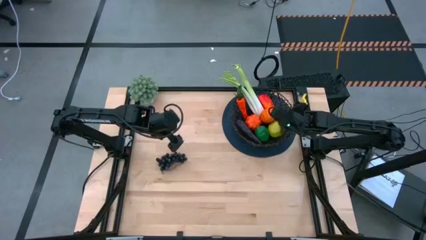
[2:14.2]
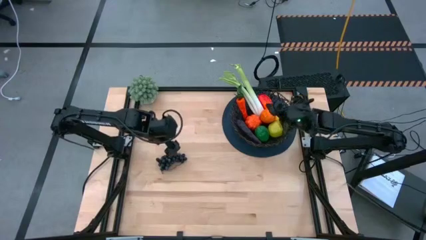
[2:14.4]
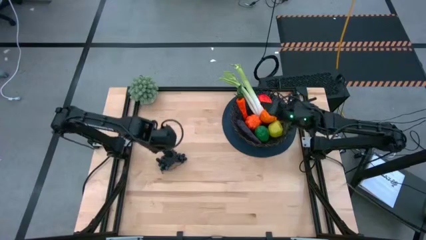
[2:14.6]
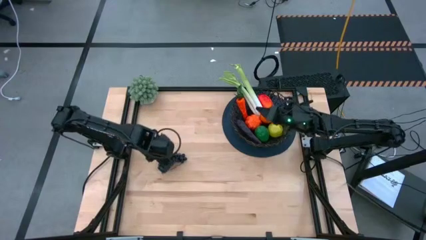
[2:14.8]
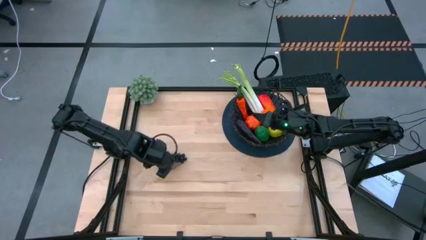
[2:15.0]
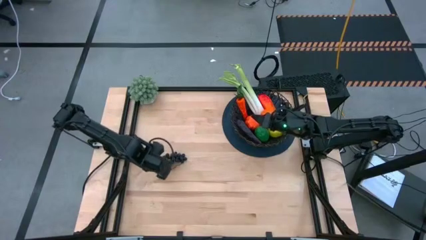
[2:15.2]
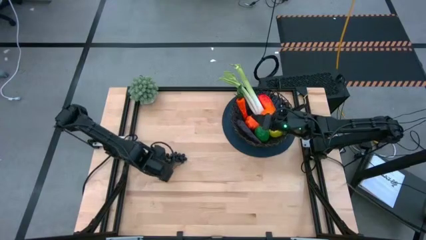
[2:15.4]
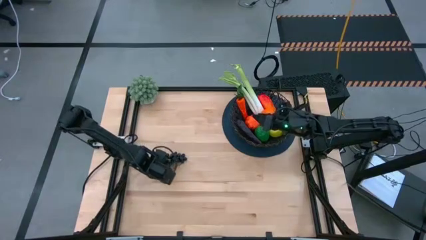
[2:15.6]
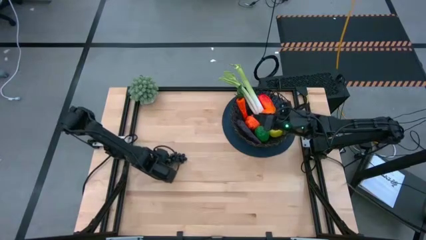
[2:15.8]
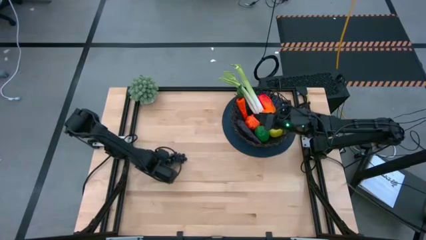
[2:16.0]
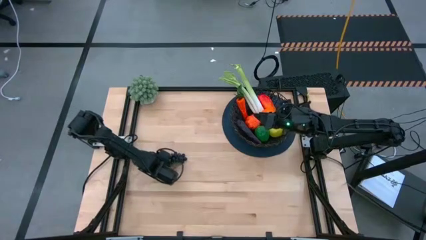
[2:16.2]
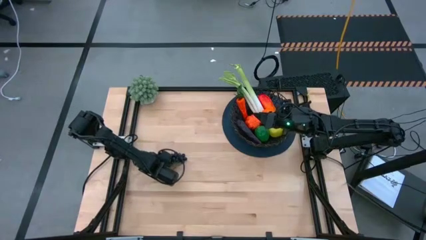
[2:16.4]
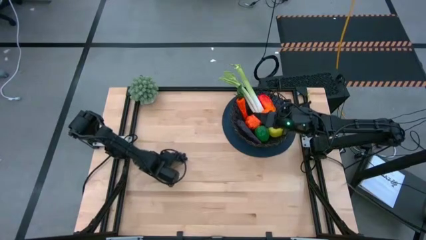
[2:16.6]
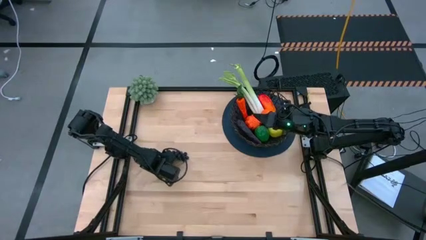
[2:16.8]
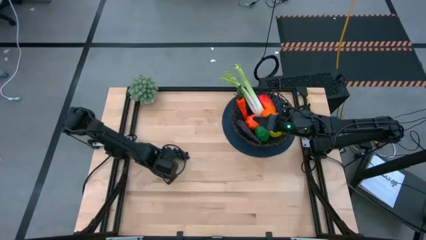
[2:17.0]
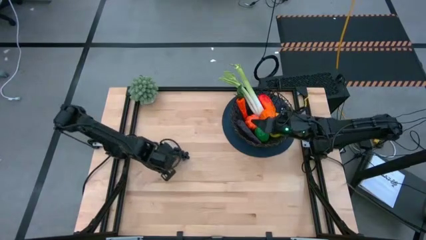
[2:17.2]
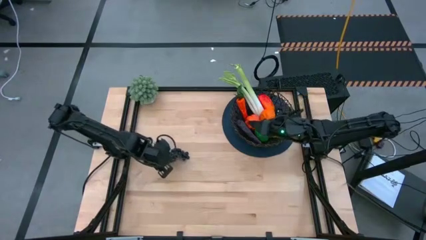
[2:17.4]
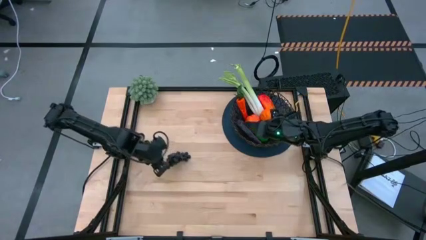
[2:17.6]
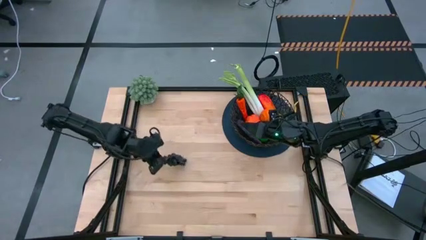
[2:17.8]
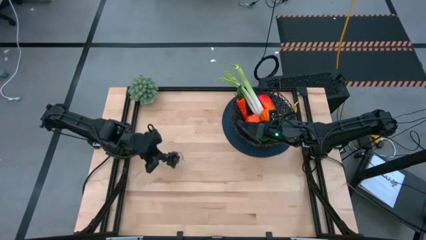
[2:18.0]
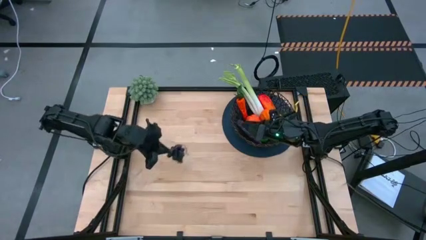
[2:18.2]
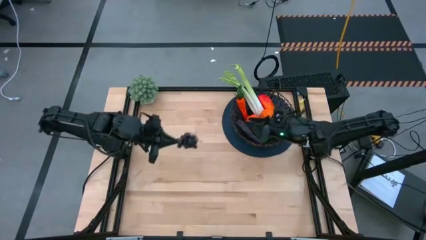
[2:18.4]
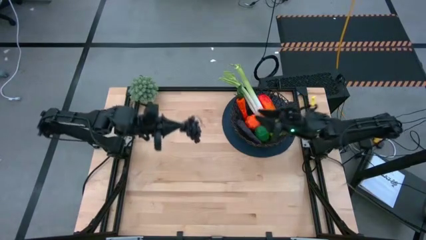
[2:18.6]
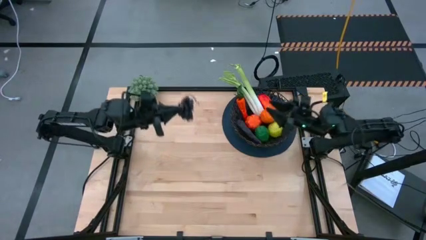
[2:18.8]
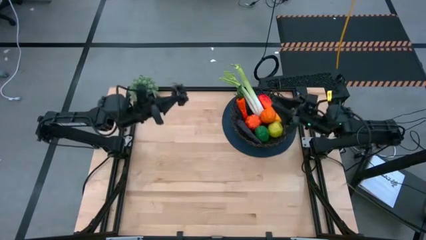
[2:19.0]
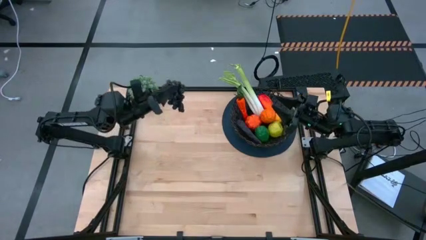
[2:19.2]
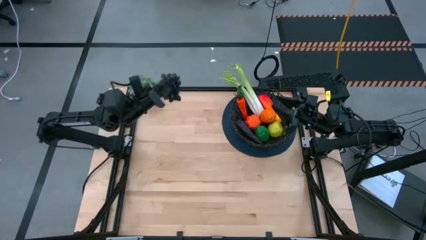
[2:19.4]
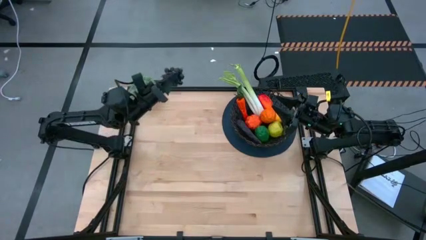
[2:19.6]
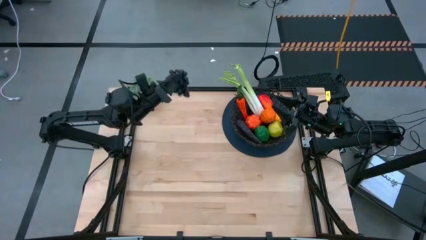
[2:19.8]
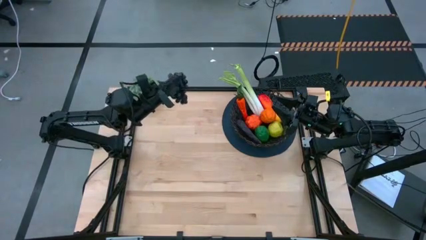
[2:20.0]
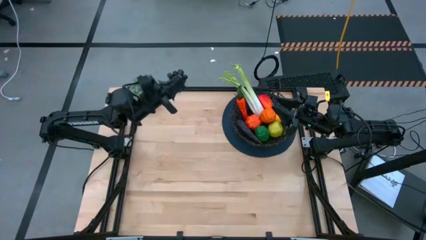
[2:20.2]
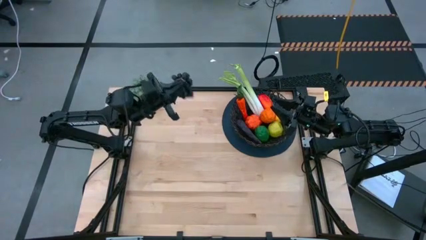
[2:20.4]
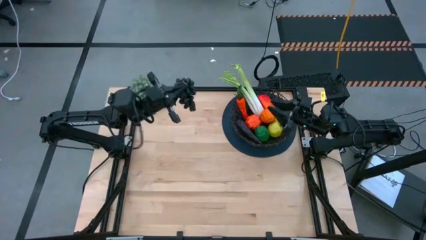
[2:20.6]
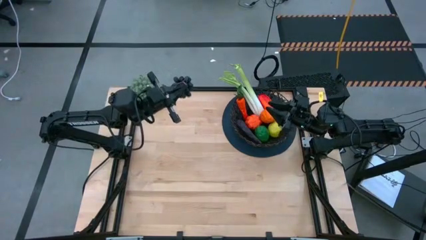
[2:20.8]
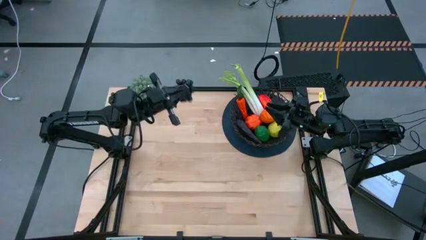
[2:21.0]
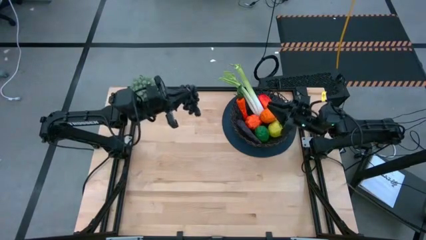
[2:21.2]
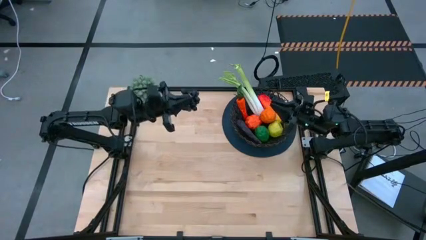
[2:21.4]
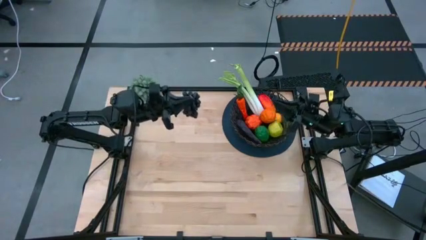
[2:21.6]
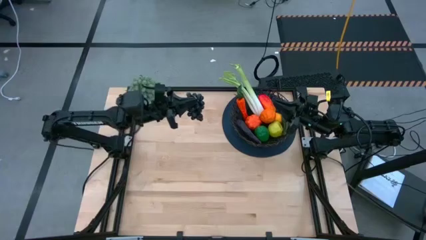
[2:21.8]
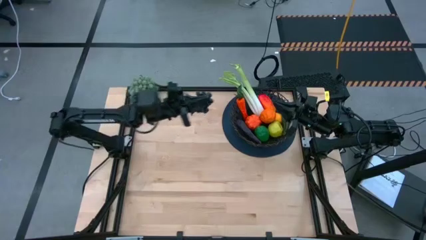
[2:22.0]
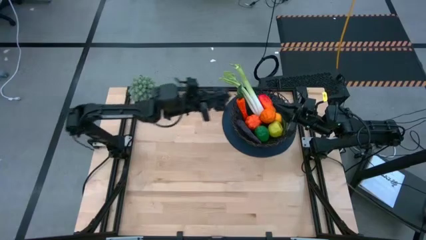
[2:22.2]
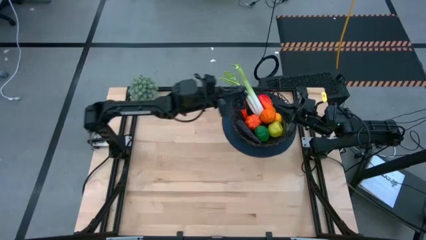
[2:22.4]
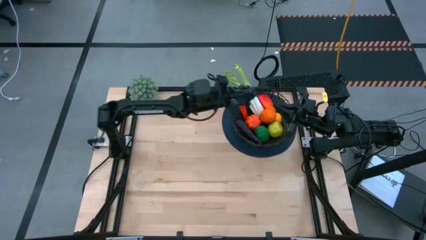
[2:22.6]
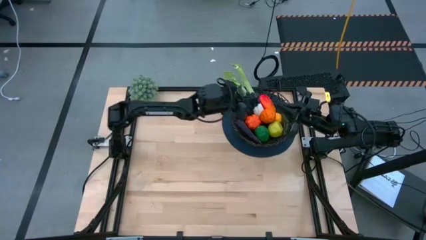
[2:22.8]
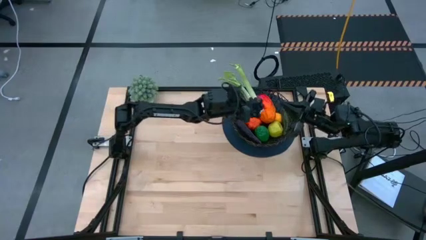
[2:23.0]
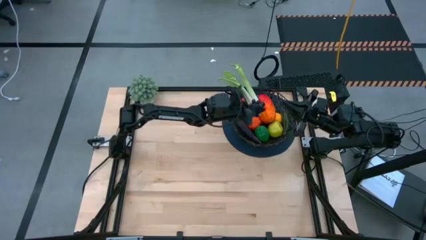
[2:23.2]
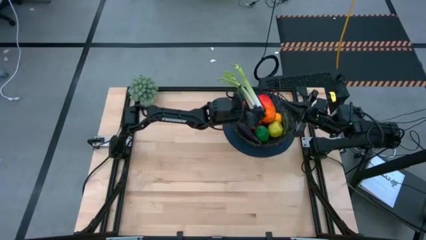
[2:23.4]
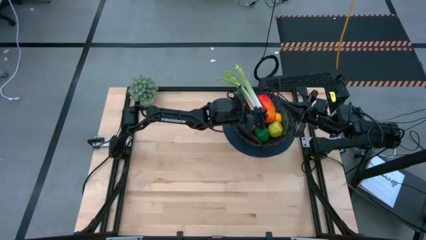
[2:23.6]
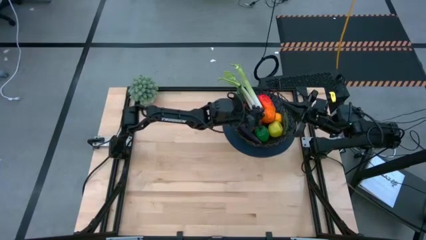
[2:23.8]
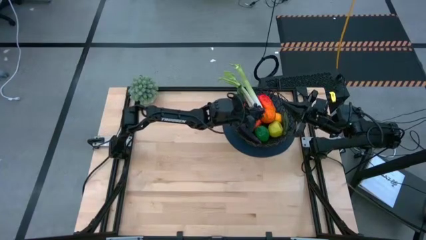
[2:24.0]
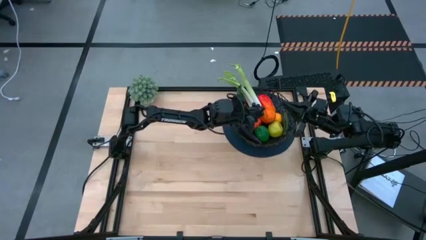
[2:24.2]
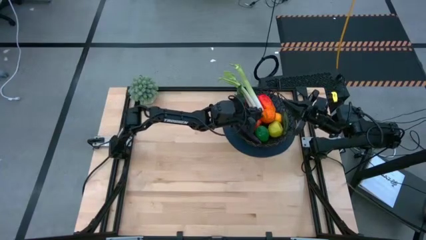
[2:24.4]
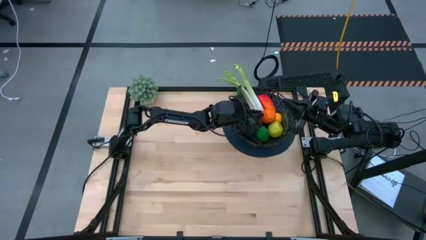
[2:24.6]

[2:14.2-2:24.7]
Task: Build produce basket
Put the black grapes into the black woven basket
